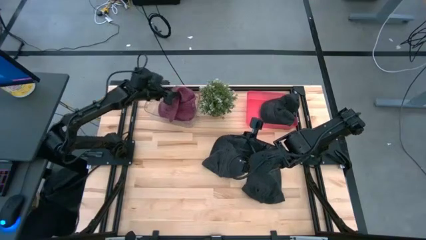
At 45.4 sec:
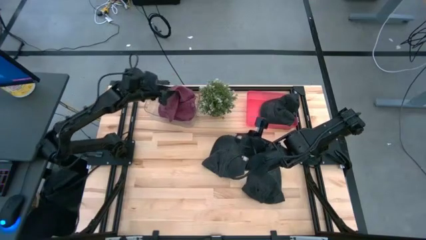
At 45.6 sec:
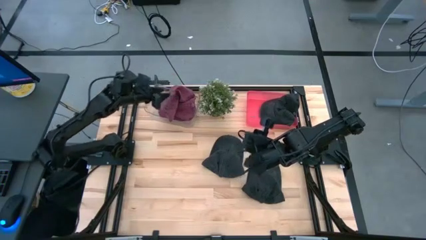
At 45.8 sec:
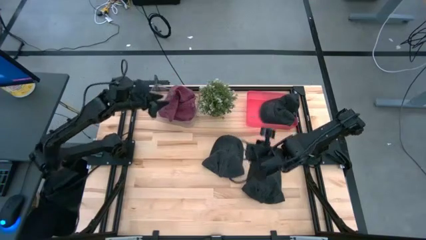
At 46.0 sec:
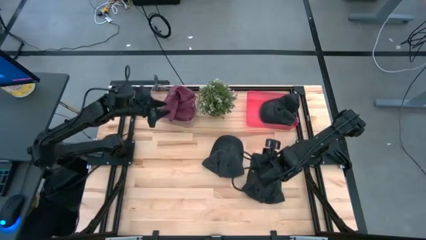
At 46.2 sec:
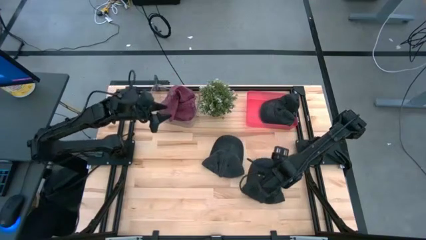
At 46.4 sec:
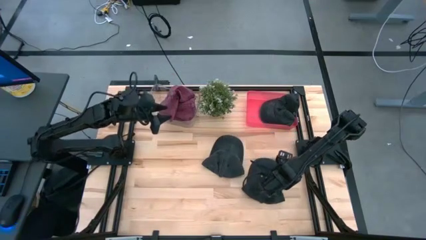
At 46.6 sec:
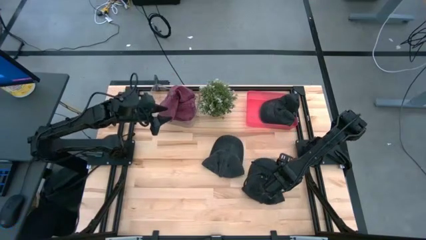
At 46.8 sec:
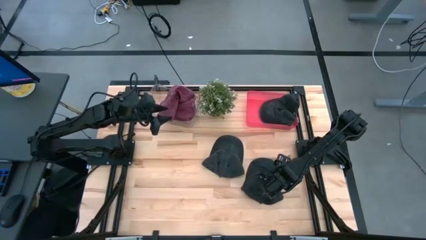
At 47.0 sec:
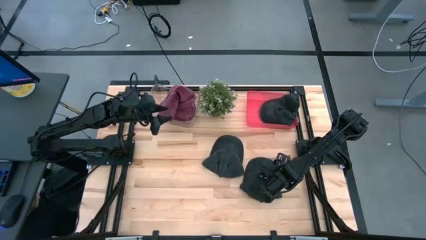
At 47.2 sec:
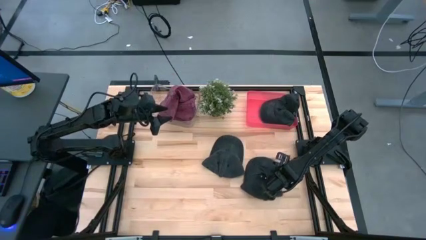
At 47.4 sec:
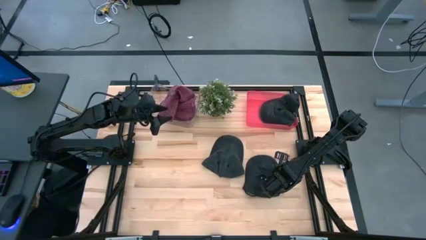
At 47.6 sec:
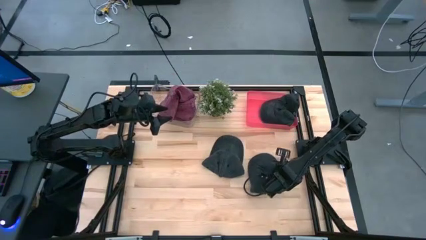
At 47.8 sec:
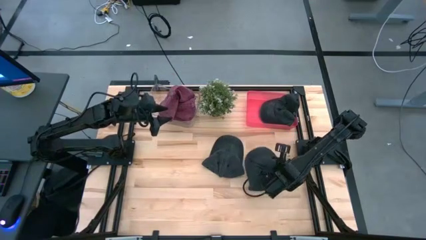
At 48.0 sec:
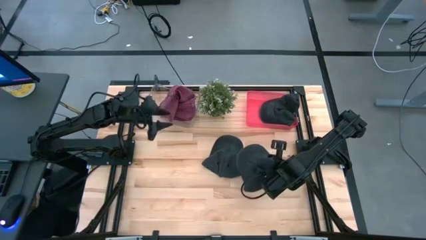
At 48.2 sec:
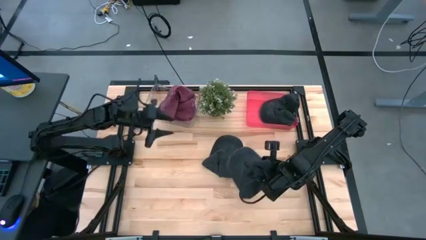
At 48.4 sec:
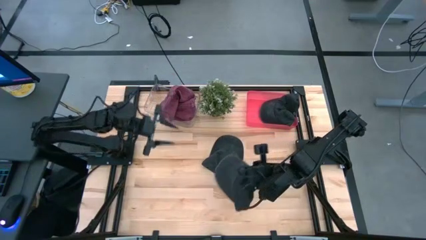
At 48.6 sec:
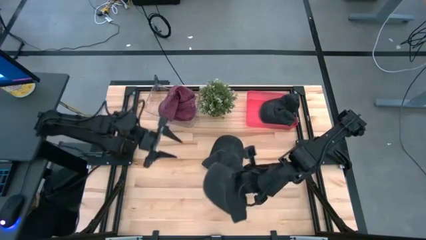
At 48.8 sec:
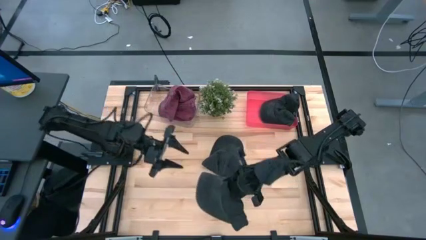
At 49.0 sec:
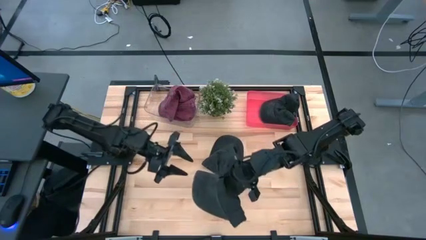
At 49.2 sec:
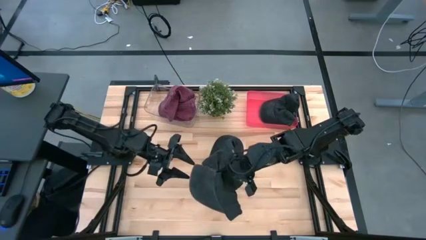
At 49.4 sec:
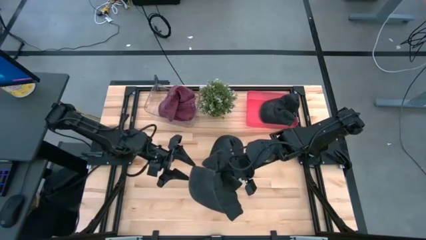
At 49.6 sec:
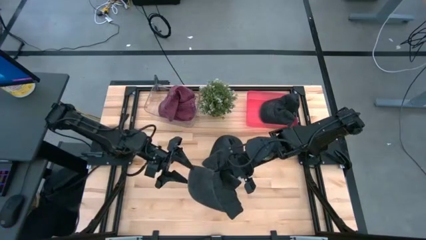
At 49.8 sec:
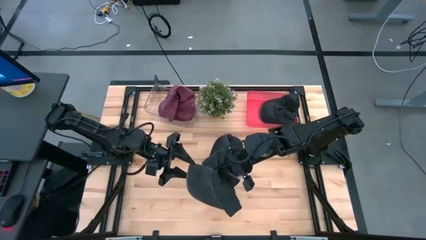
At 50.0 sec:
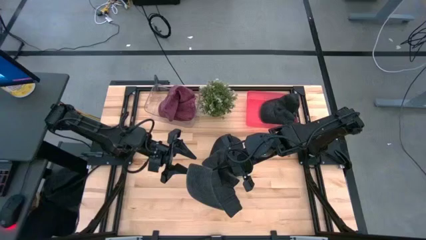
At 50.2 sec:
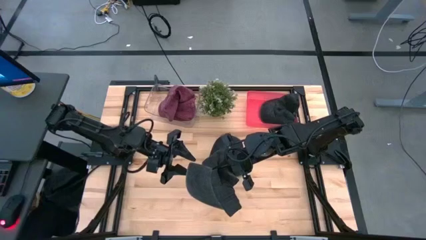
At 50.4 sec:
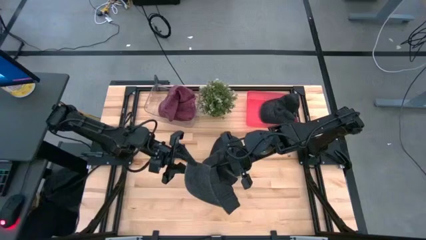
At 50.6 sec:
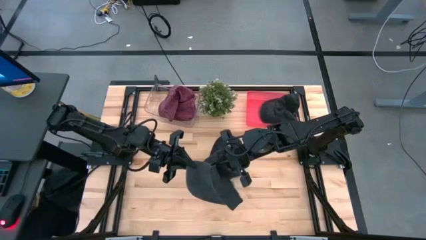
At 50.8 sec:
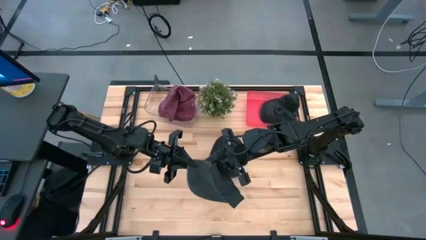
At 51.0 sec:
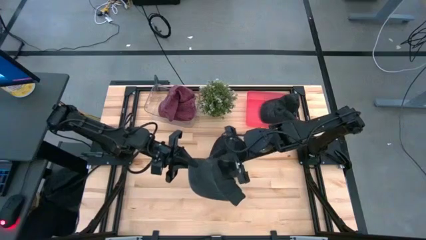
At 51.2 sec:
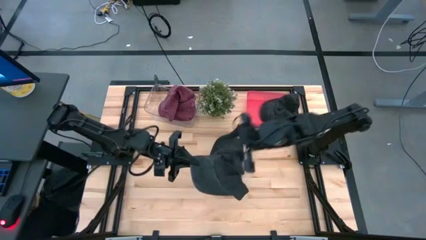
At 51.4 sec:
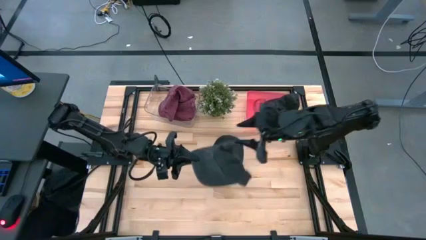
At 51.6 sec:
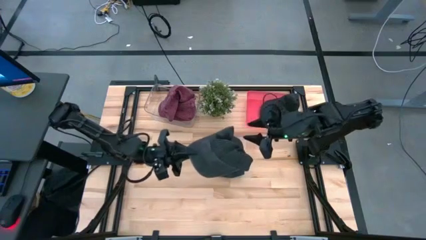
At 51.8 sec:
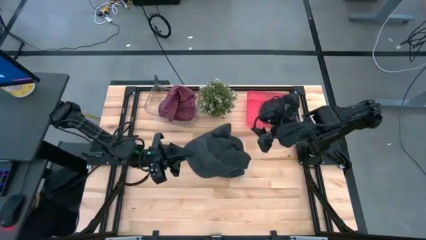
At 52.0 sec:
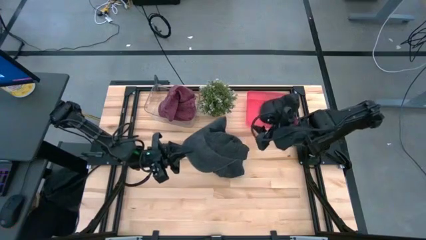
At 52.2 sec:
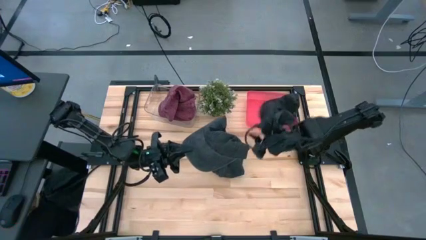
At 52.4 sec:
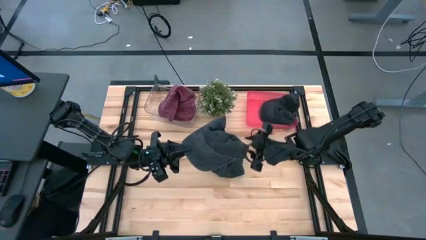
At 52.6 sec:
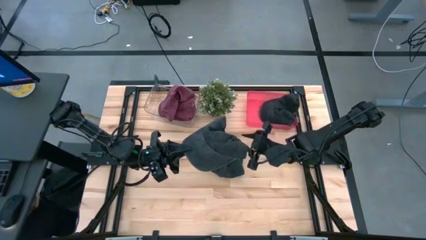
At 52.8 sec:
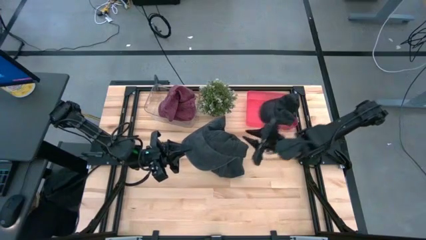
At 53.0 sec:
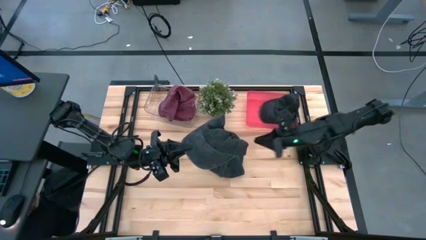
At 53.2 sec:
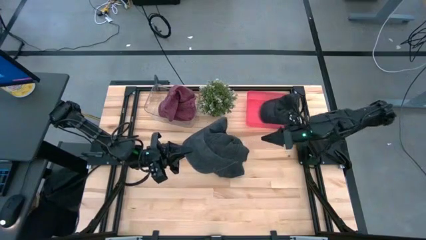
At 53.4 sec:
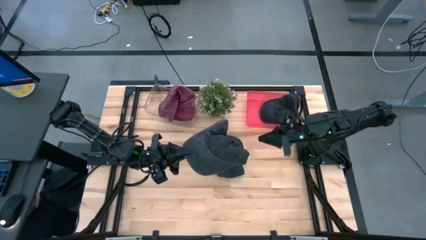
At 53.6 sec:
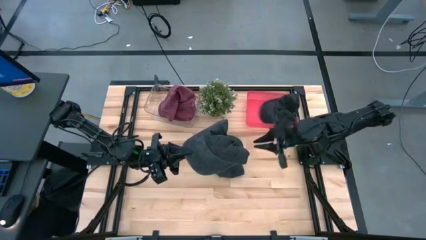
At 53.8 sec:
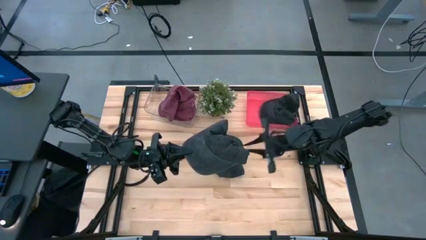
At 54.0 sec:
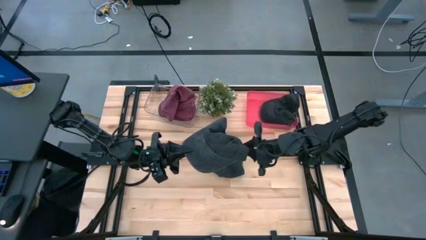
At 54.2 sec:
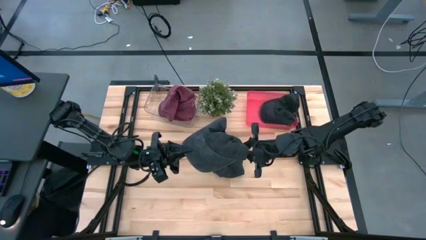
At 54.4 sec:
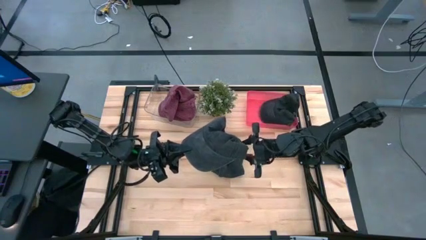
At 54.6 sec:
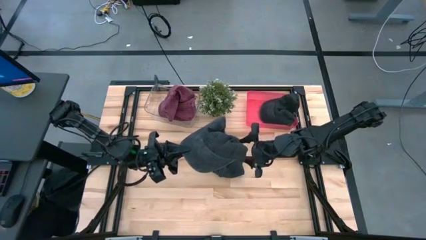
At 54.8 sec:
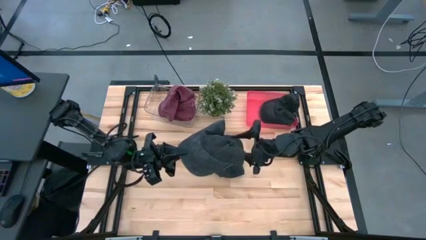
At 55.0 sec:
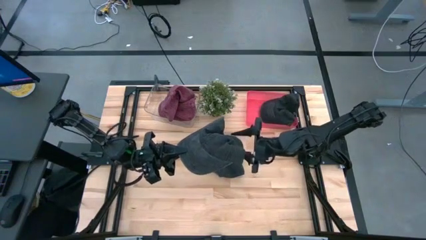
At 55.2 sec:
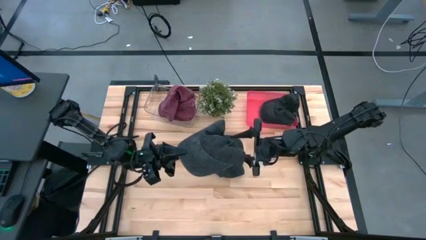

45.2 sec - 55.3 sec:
Task: Pick & Place hat
Put the right black cap into the pink bin

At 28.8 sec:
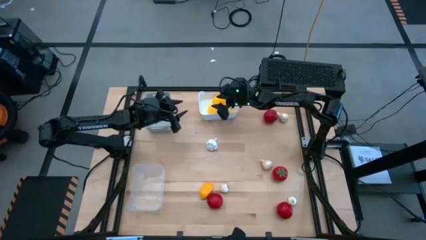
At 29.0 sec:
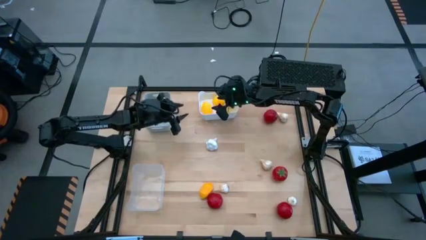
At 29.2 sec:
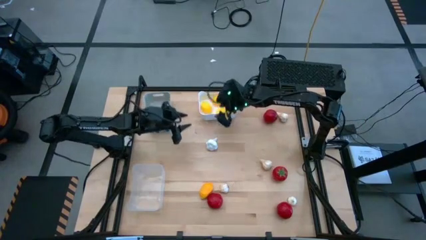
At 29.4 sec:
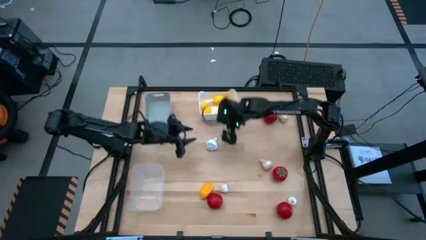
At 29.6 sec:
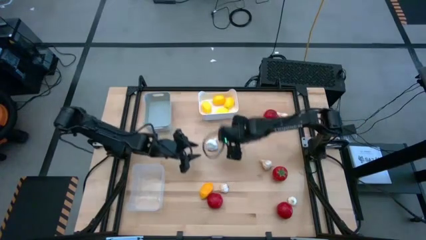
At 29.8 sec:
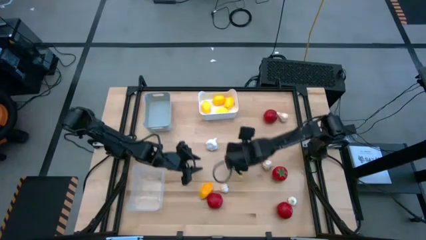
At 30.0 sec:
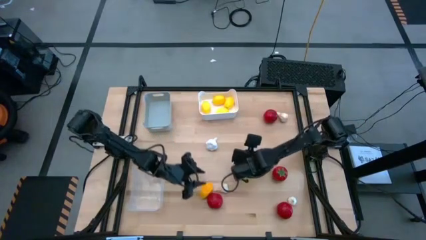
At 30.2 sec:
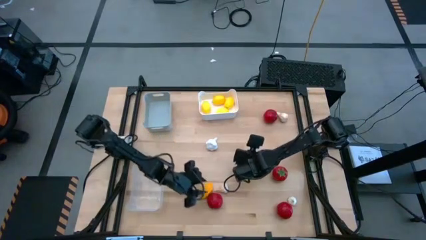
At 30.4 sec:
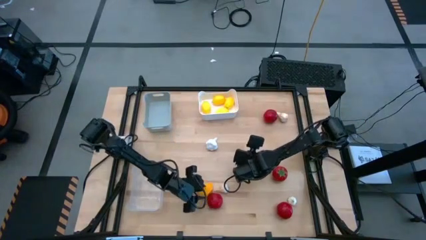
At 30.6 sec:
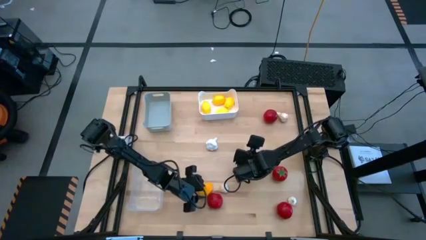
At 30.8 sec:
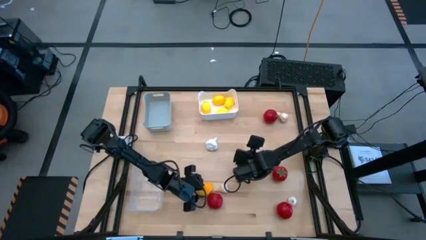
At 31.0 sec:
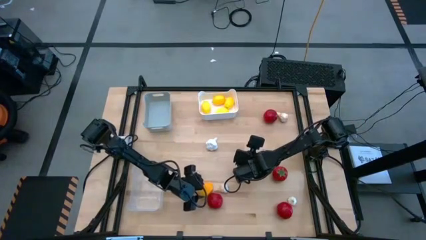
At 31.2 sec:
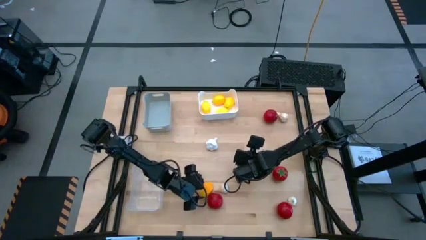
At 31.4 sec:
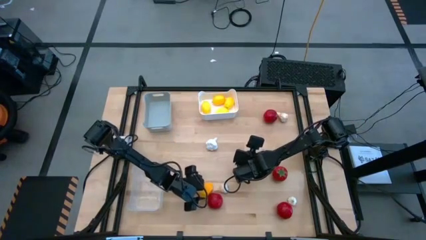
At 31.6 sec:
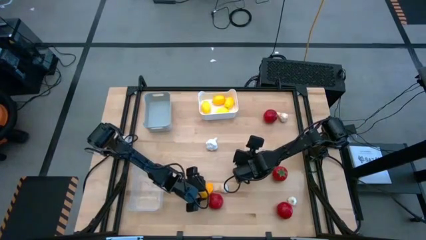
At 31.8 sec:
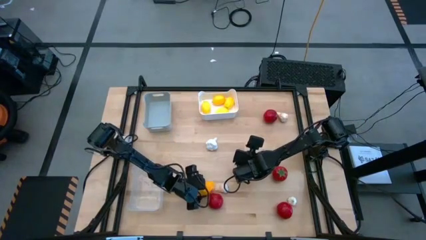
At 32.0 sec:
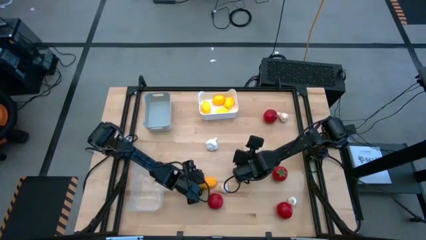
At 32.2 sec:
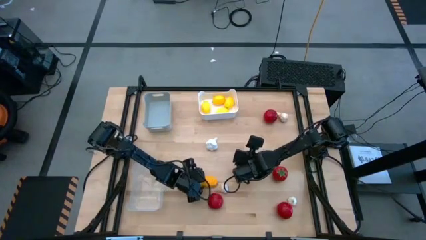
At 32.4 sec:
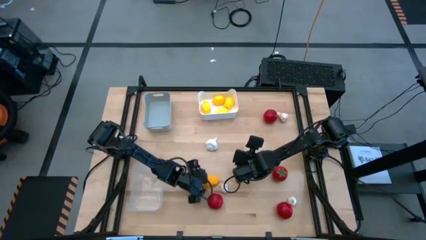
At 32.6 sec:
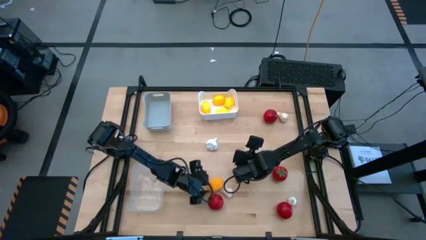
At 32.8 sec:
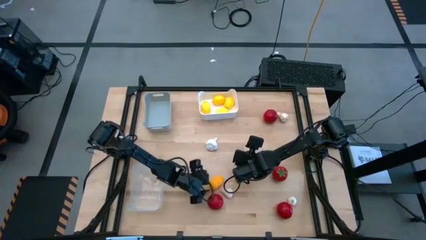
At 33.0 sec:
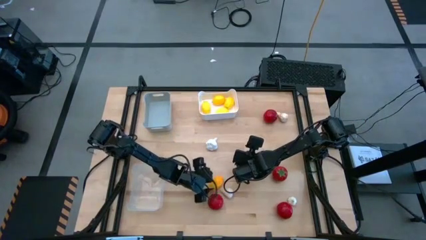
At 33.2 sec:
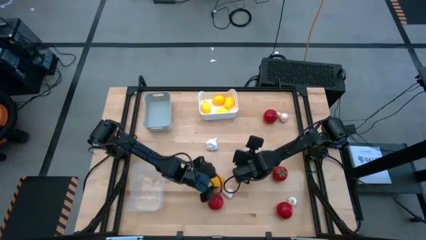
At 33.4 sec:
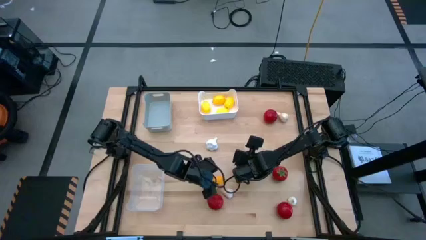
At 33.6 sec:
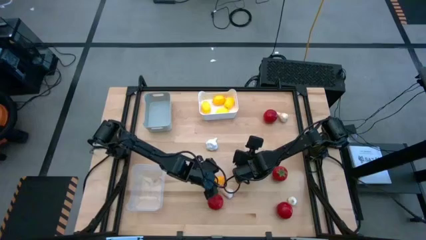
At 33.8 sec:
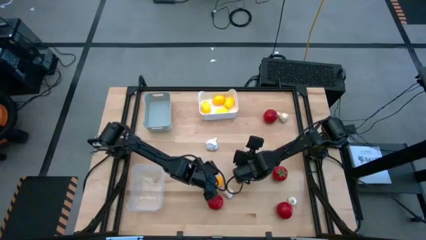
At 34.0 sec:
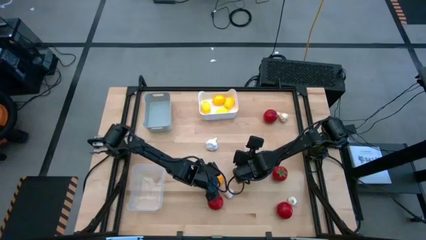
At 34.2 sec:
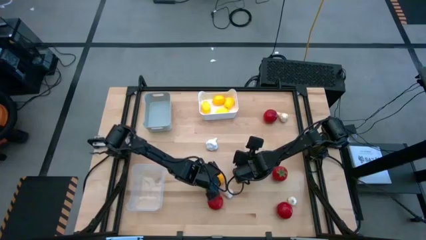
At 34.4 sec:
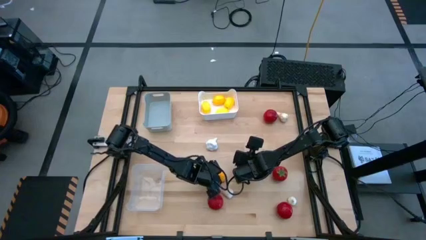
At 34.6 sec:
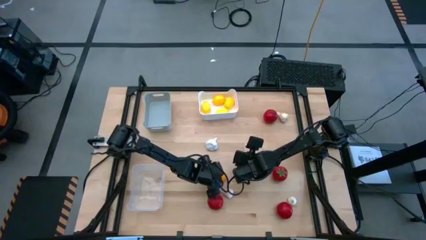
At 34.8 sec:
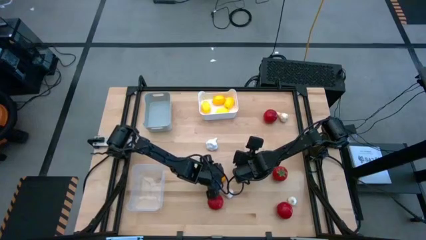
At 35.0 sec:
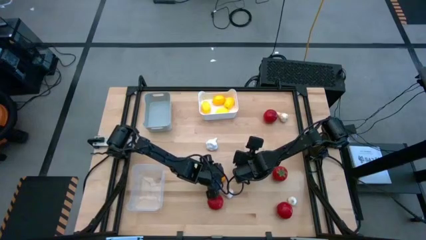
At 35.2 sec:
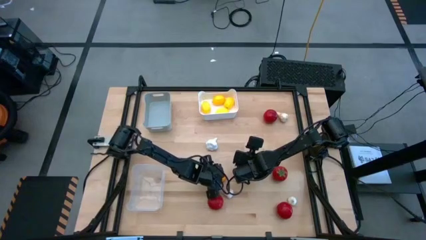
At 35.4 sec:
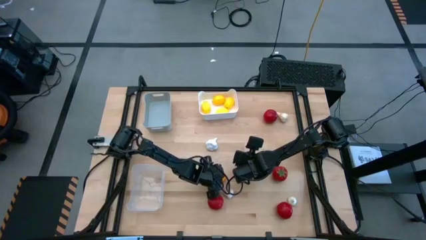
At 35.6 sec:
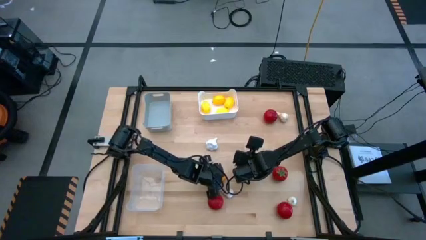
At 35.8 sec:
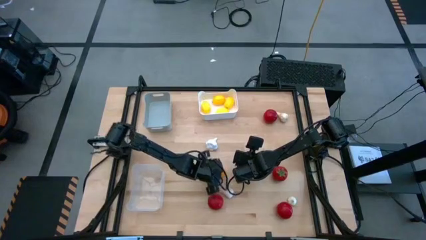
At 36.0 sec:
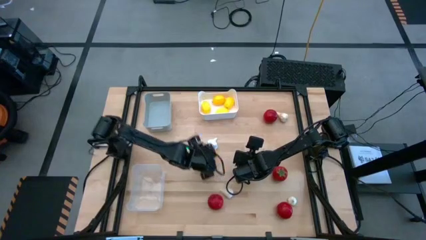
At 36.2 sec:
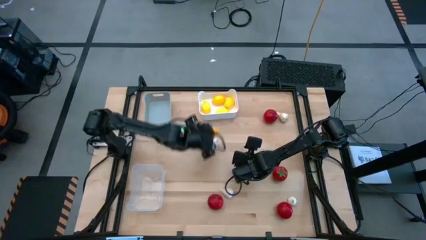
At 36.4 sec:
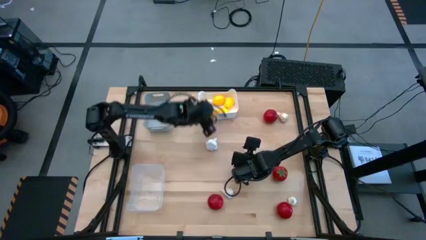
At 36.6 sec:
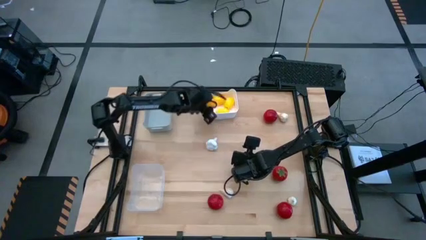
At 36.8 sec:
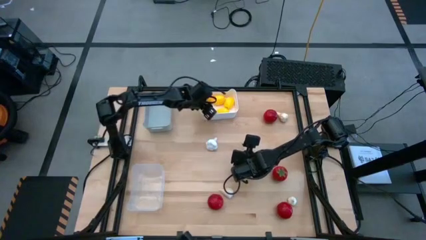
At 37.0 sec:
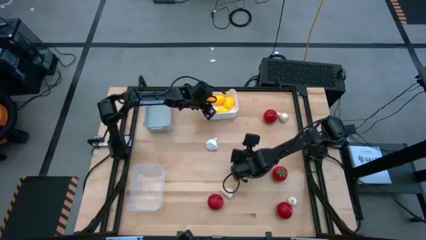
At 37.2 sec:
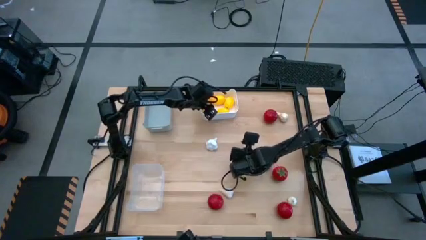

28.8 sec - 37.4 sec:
Task: Sort produce into baskets
Put the lemon into the white bin
